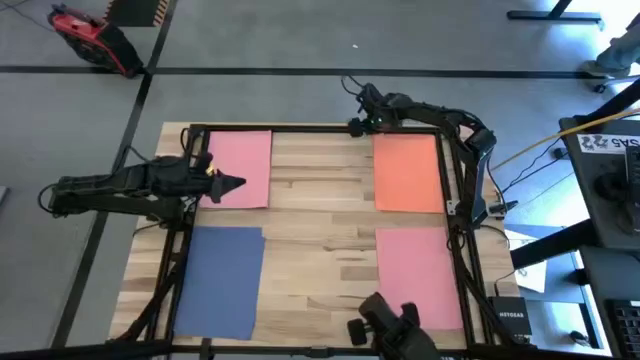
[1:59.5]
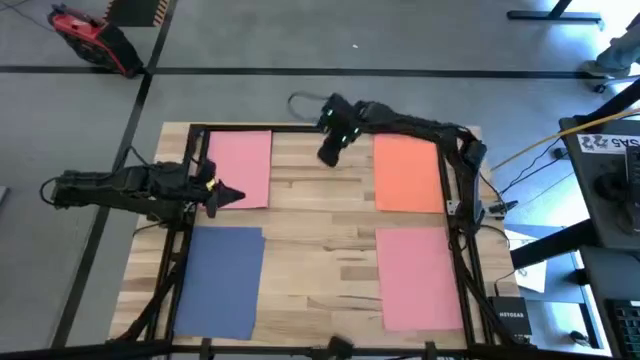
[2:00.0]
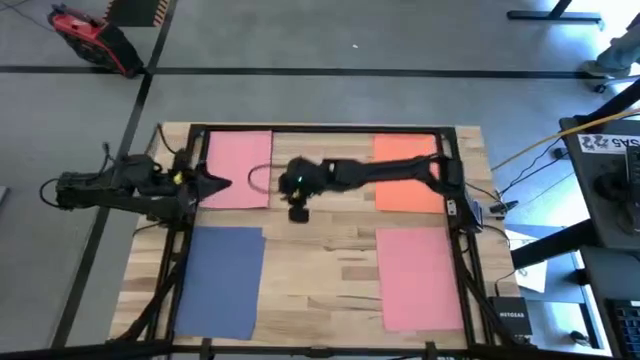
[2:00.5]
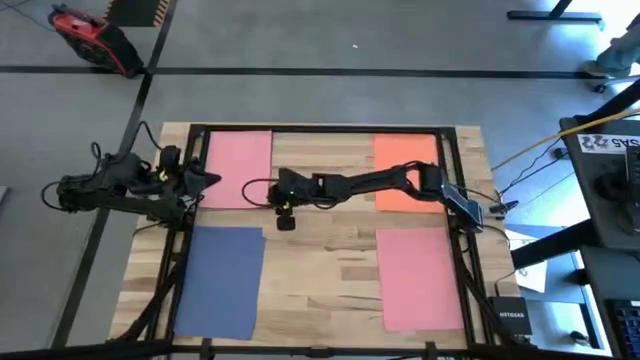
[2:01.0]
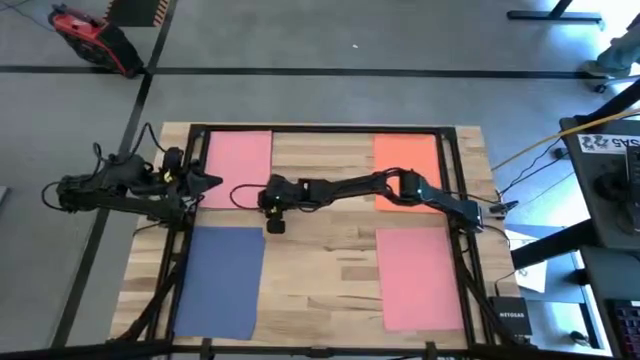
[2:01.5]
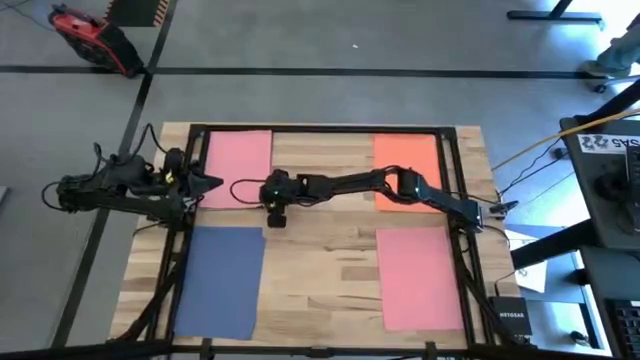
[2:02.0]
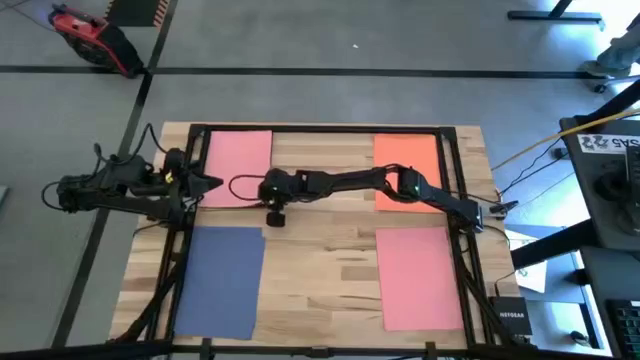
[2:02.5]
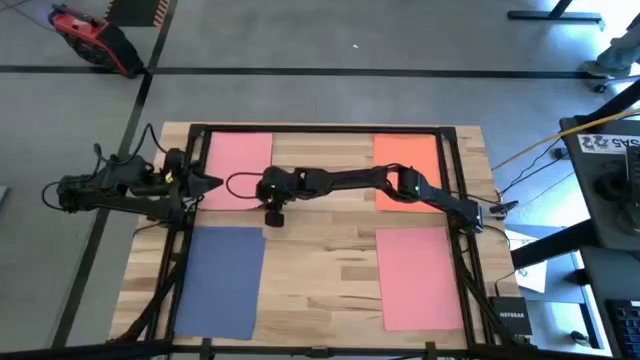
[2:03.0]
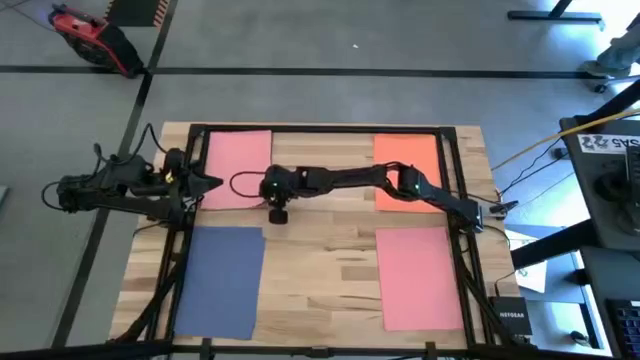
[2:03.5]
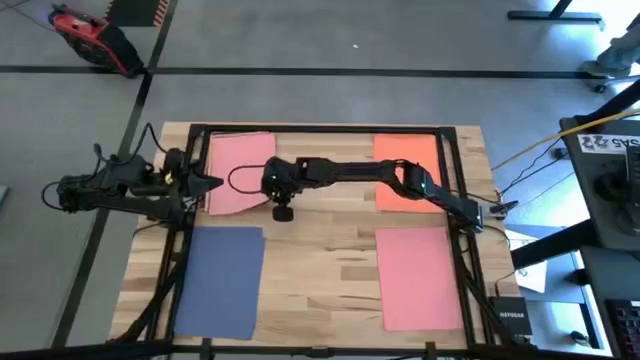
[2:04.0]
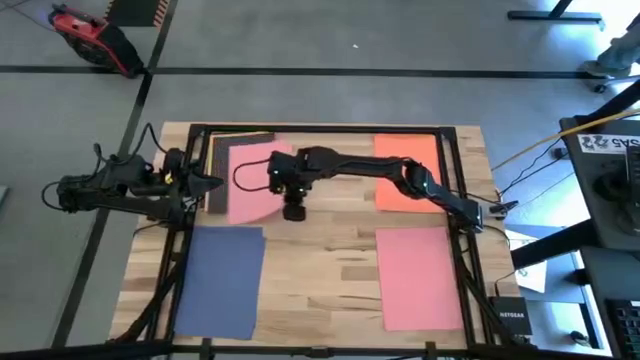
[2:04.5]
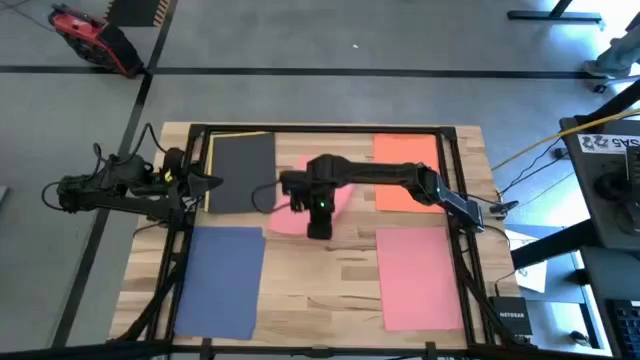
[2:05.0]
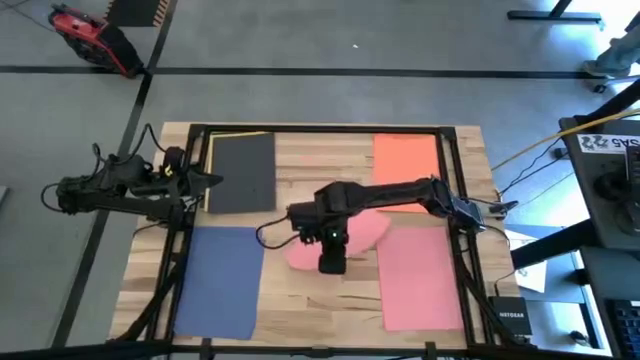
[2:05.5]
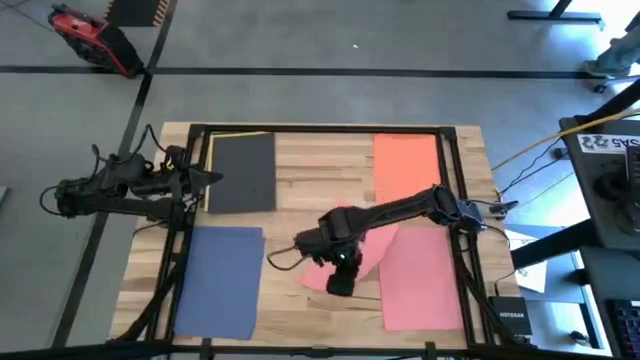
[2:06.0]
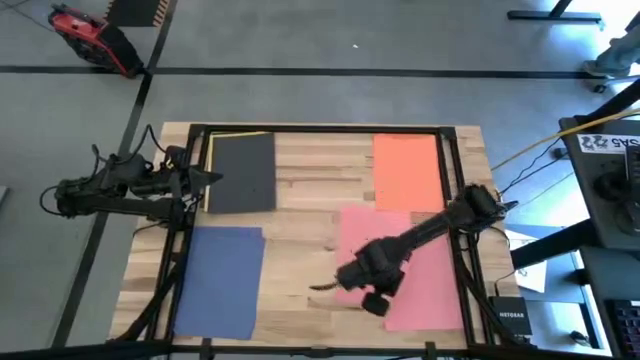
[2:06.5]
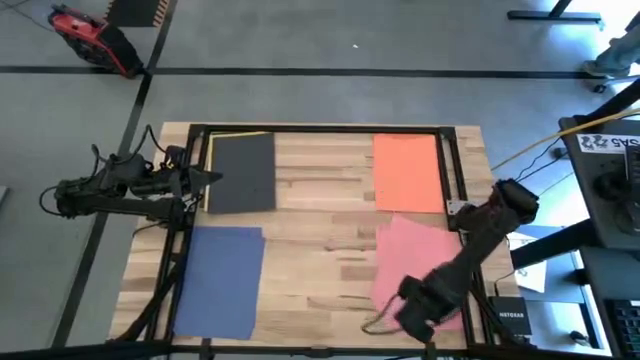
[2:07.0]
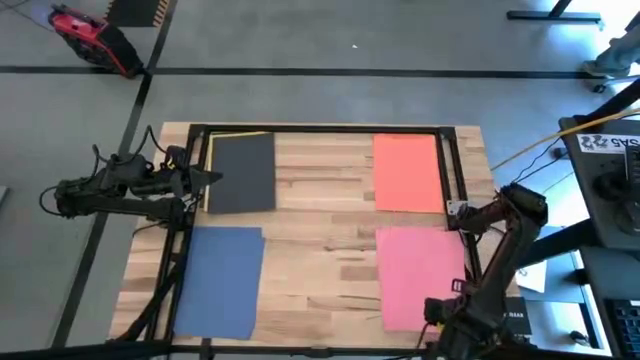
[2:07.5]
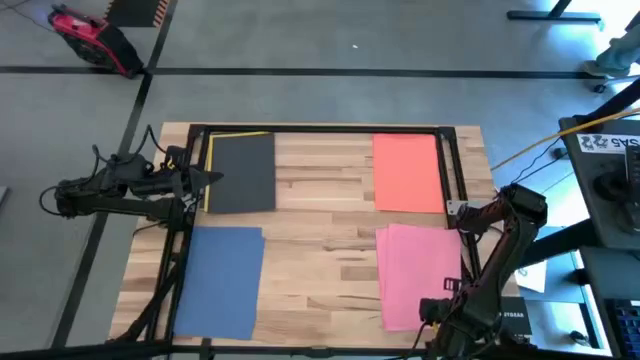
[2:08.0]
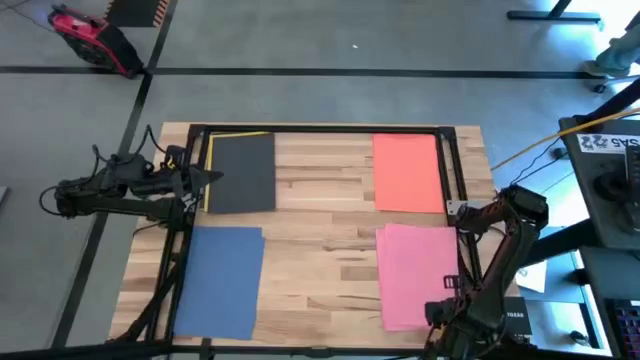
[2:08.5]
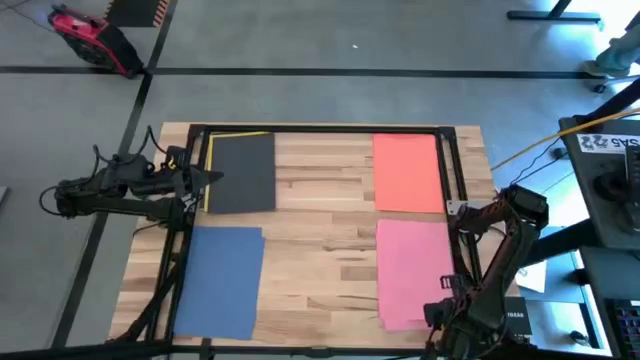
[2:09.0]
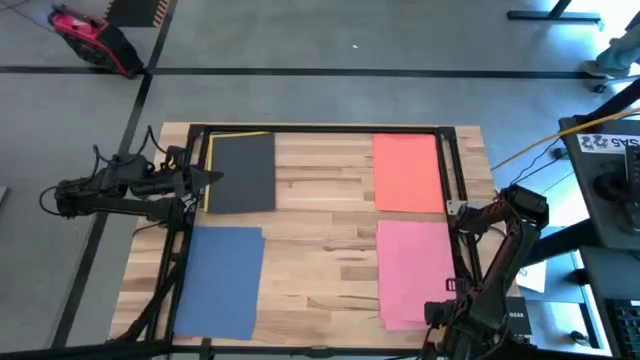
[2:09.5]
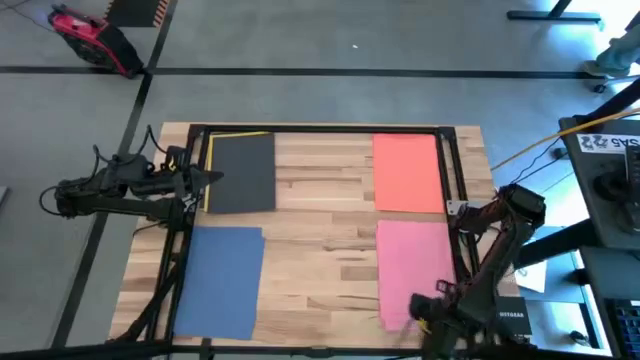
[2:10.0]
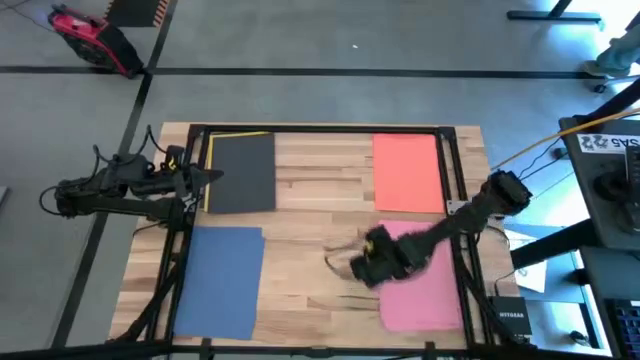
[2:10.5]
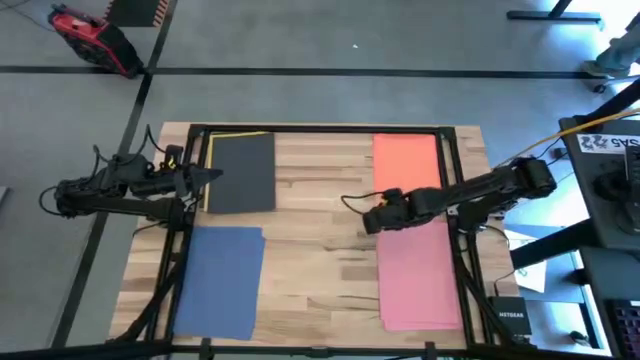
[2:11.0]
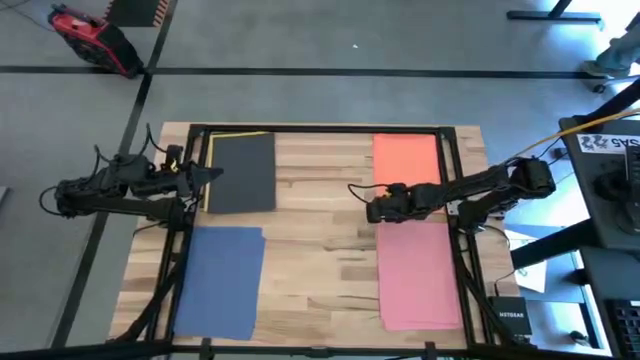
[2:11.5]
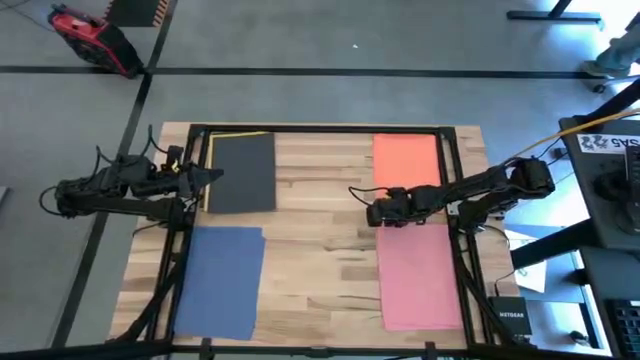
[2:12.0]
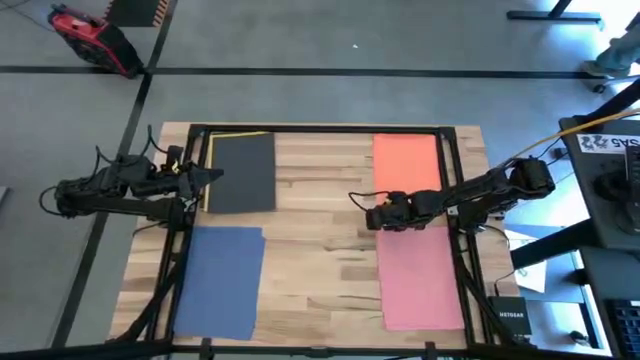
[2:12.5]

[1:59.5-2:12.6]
Task: Organize paper
Stack the pink colored paper on top of the pink colored papers

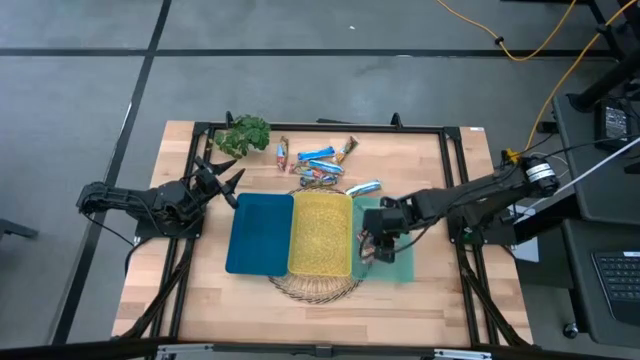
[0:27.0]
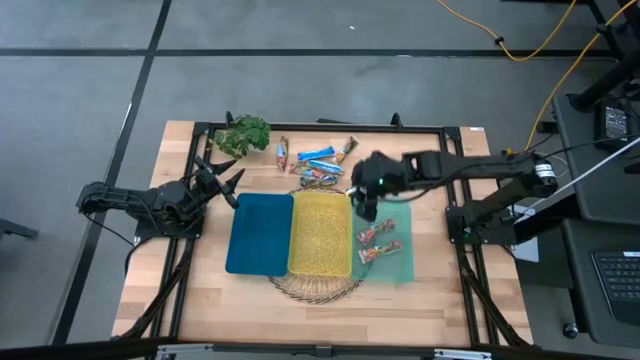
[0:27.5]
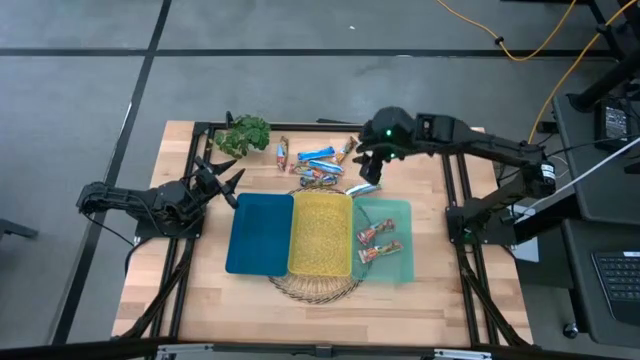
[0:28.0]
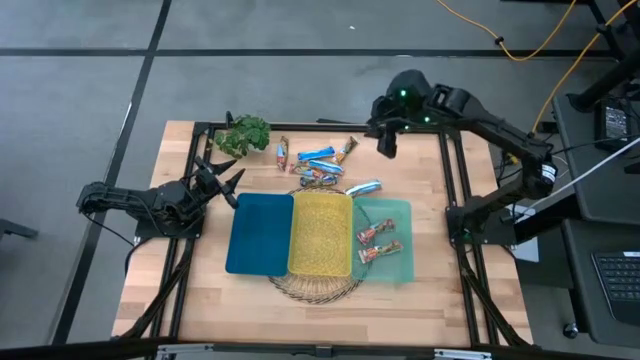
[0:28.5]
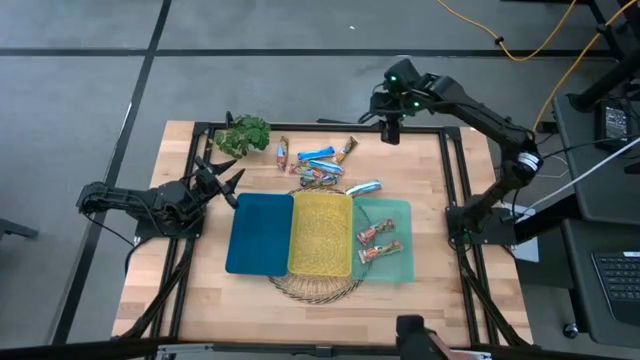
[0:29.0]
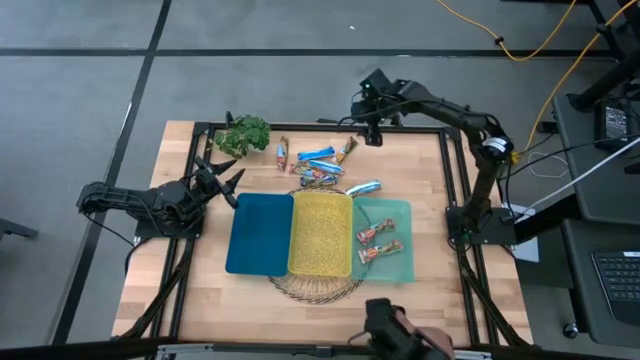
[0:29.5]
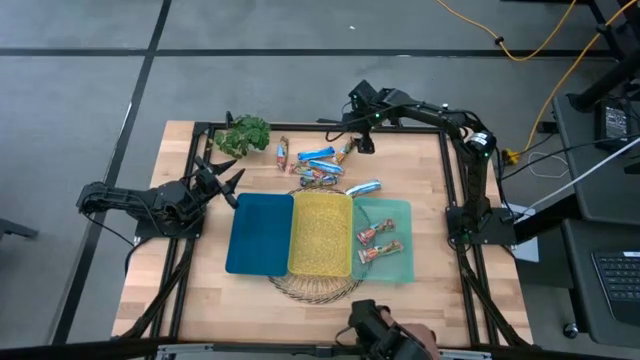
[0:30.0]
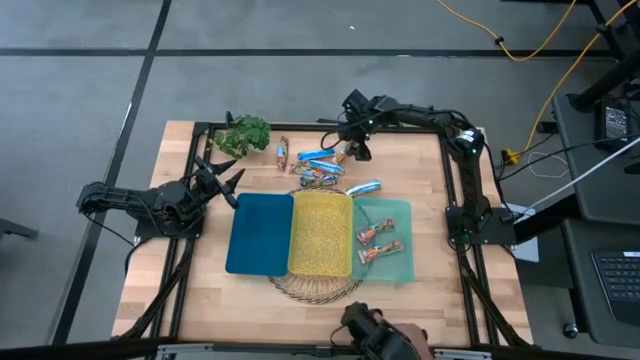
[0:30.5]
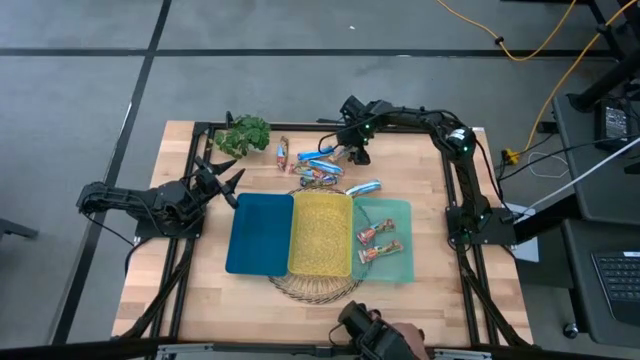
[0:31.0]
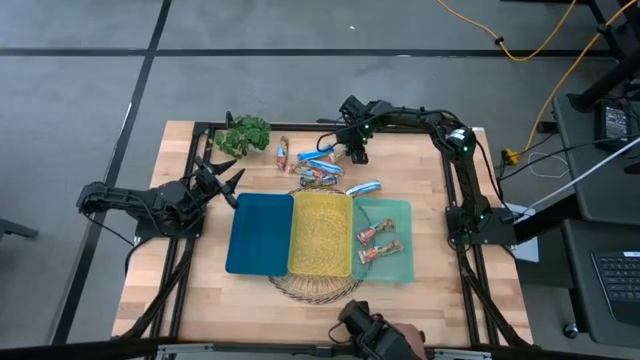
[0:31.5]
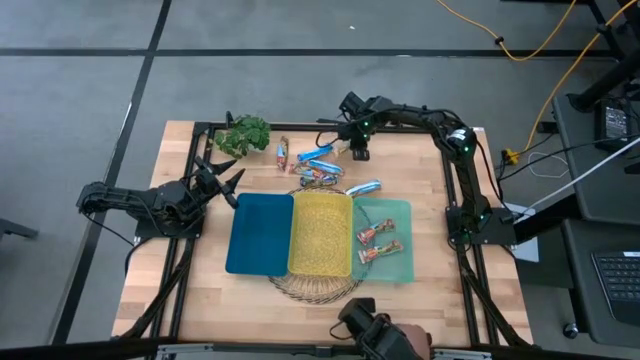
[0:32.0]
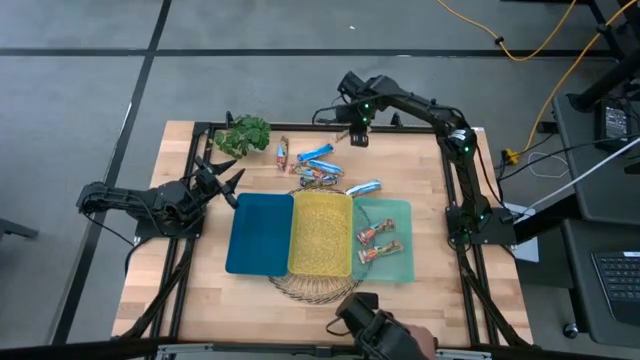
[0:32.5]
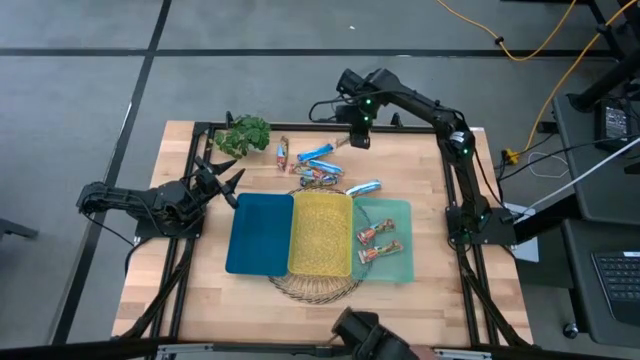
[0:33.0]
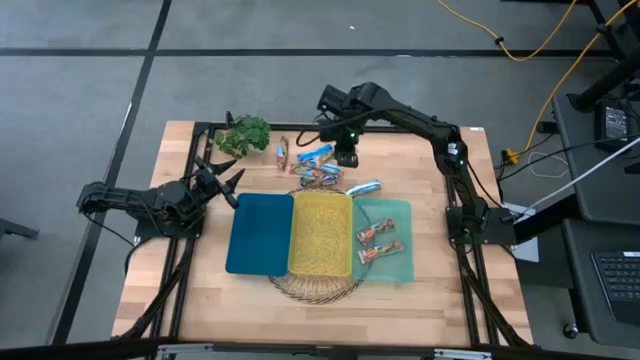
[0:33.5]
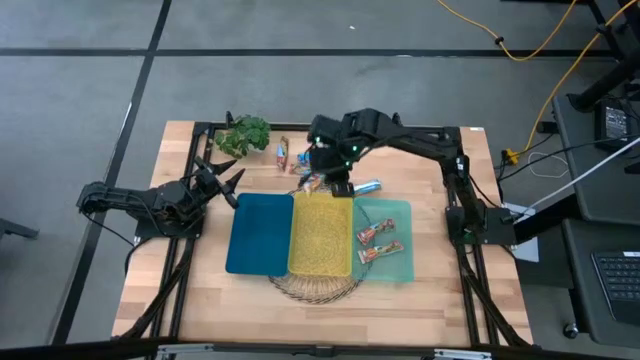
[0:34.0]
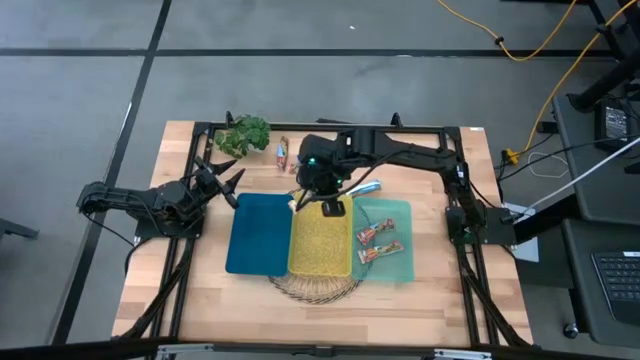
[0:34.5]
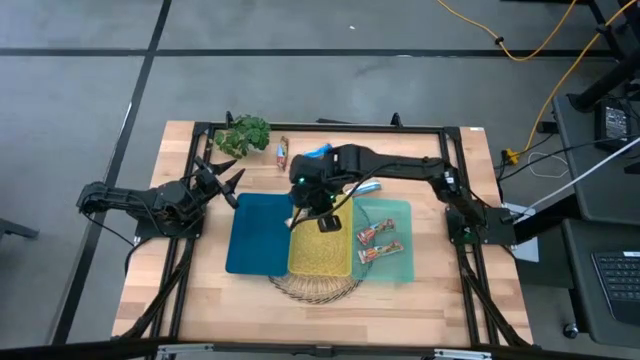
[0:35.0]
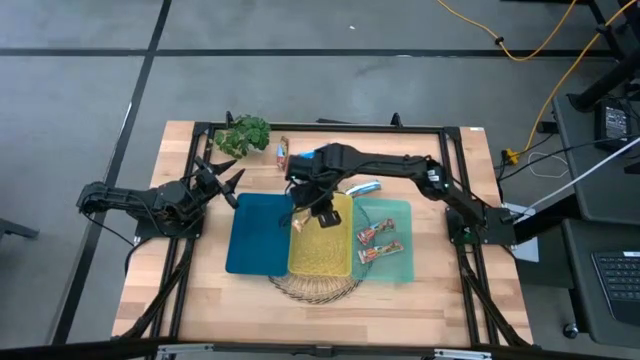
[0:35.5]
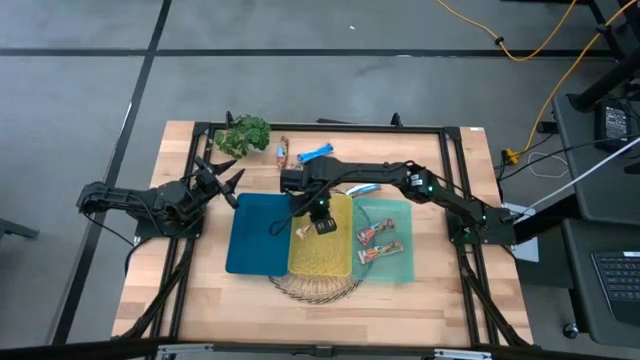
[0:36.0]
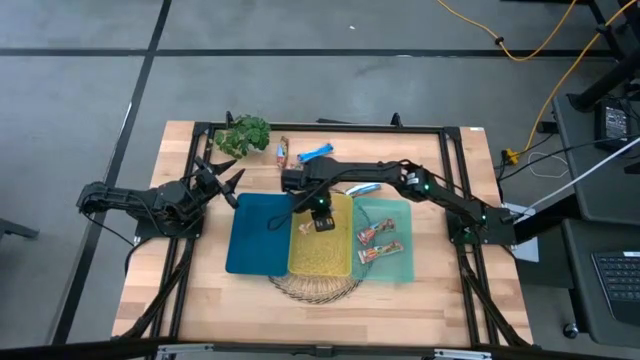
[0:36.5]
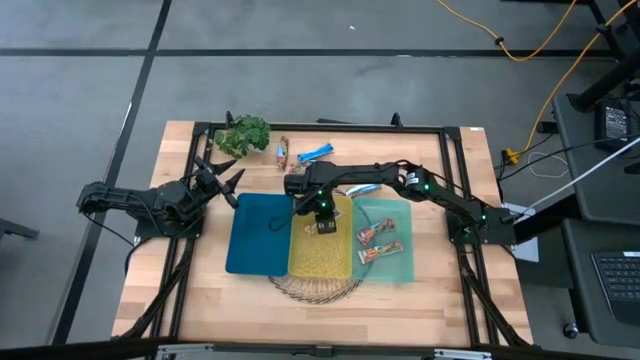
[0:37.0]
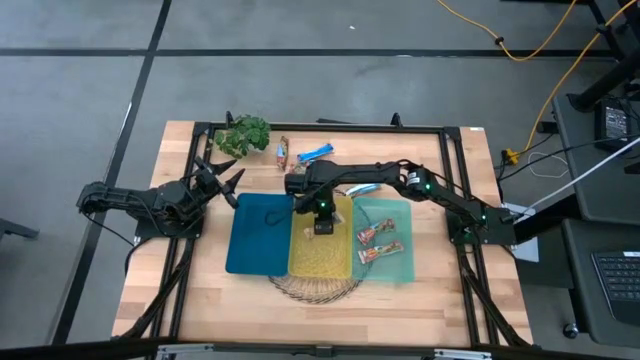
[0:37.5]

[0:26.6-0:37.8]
Task: Pick and place Granola Bars by type
Put the yellow granola bar into the yellow bin
